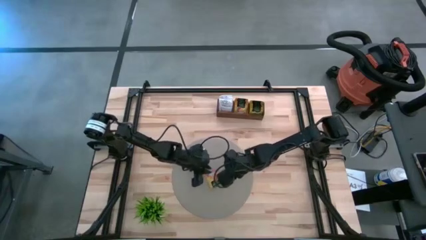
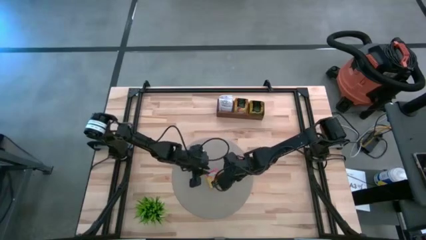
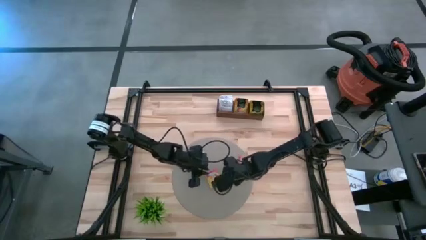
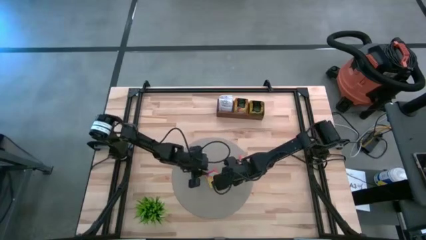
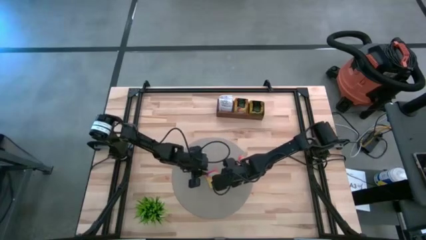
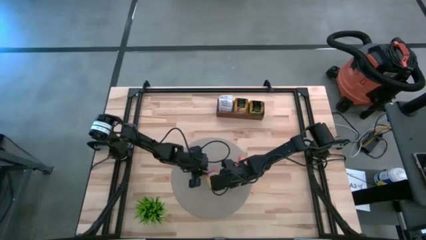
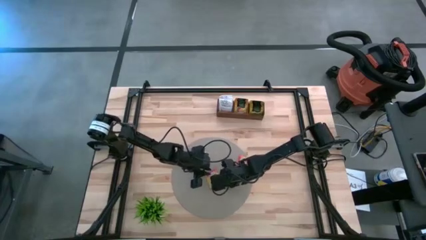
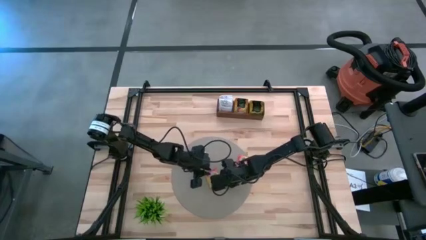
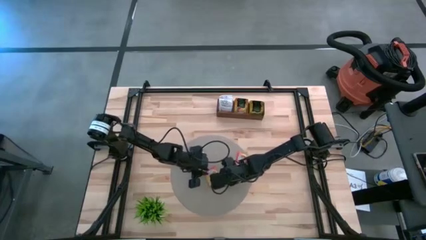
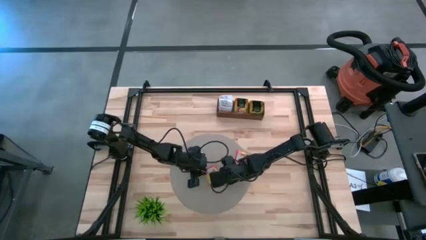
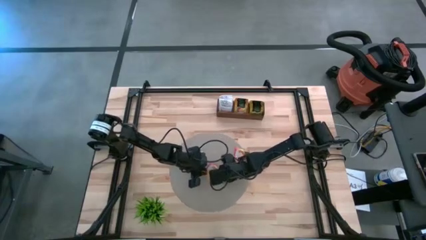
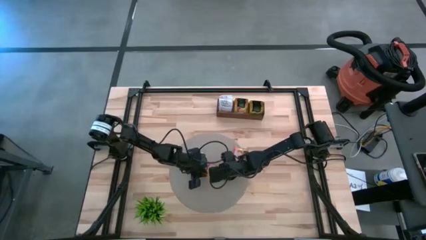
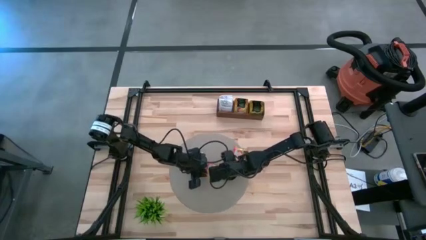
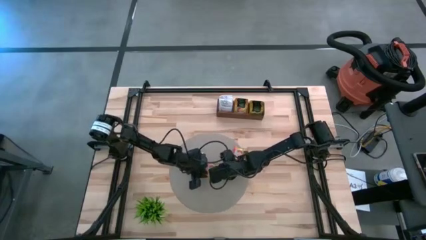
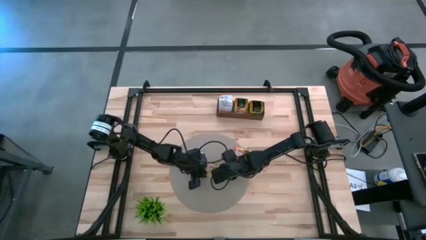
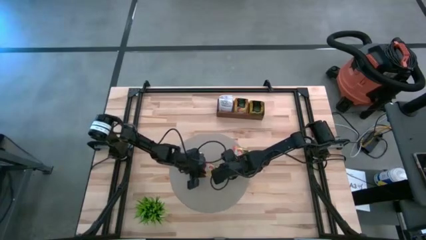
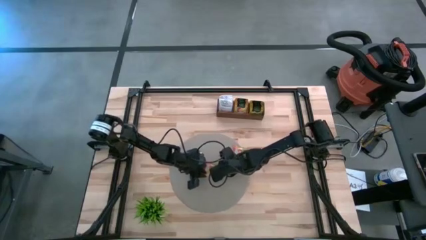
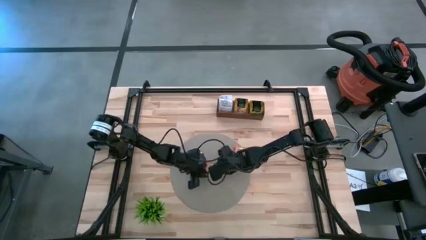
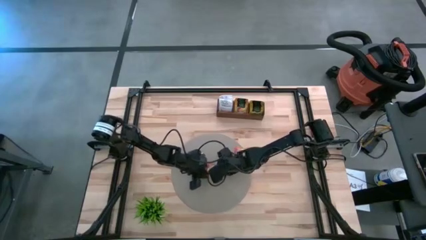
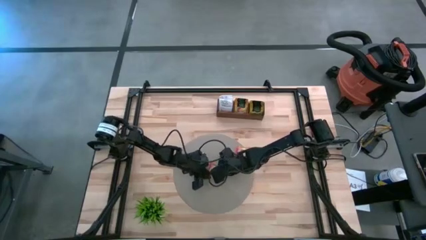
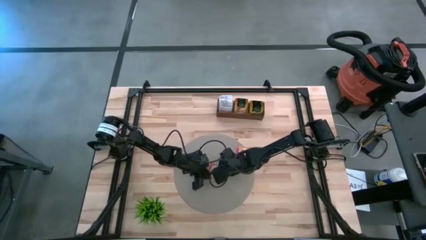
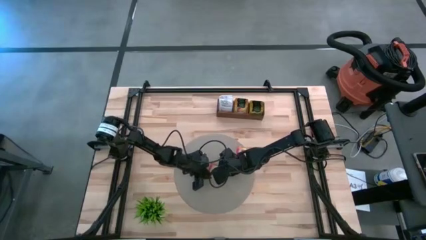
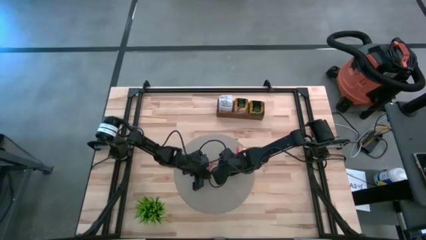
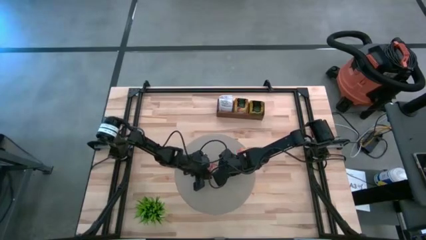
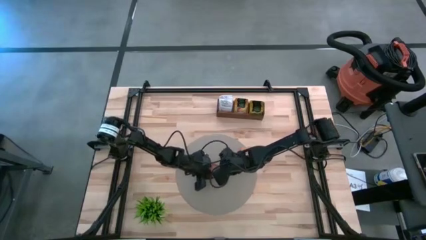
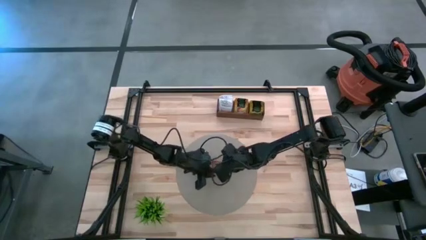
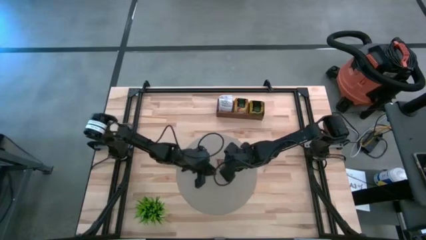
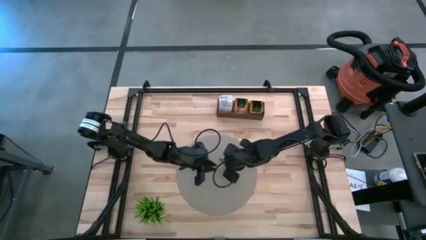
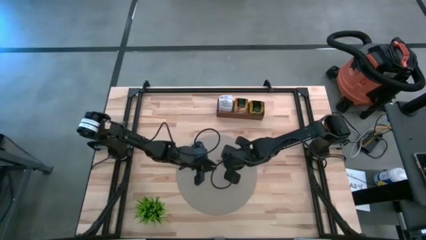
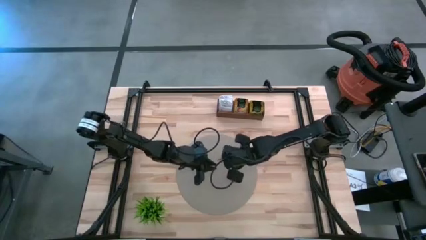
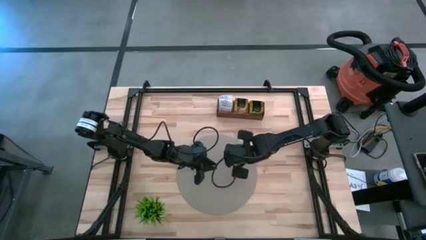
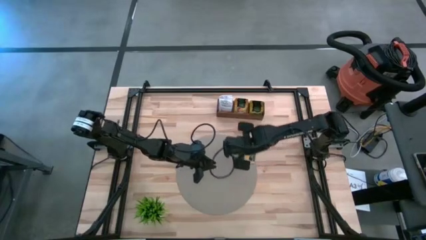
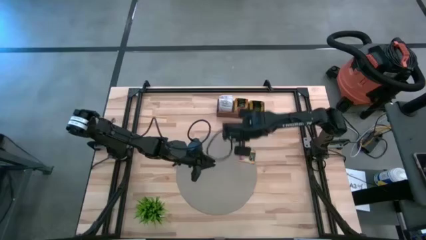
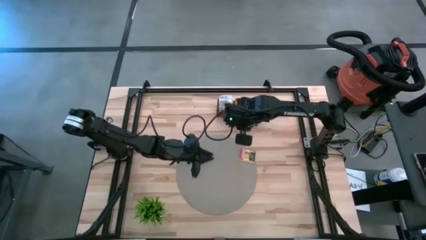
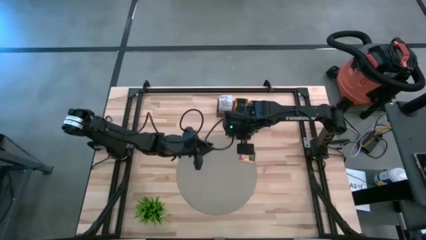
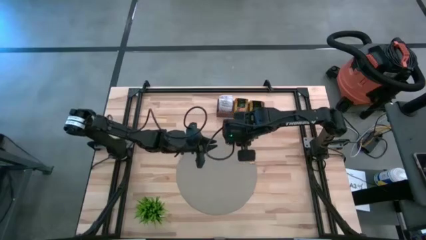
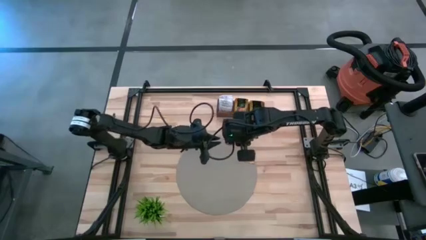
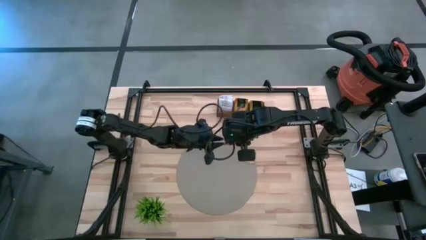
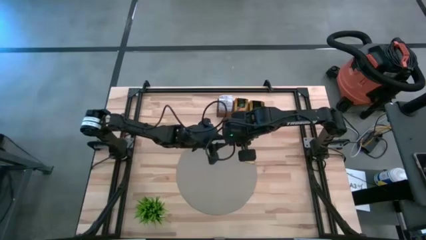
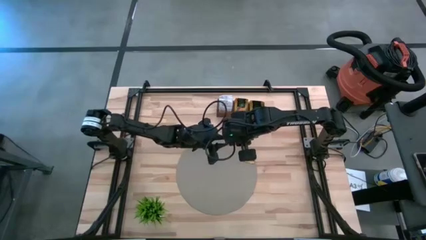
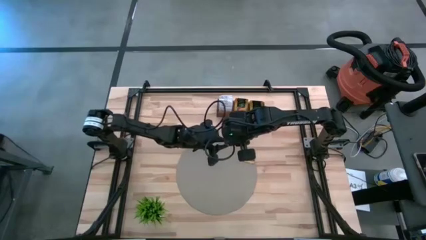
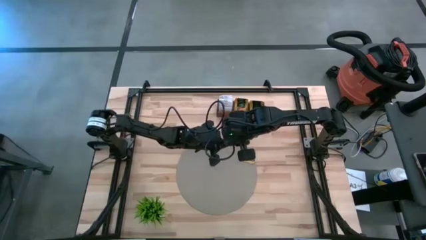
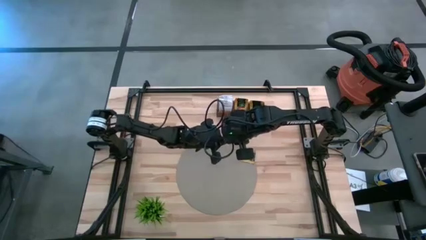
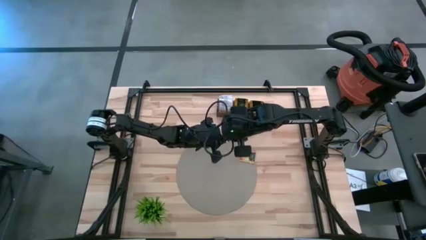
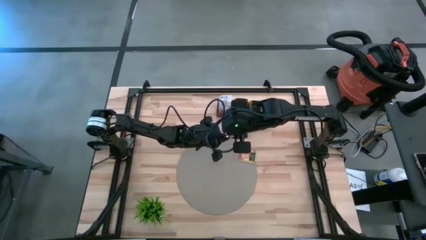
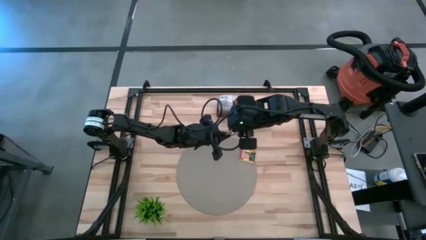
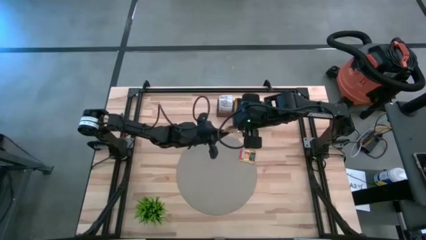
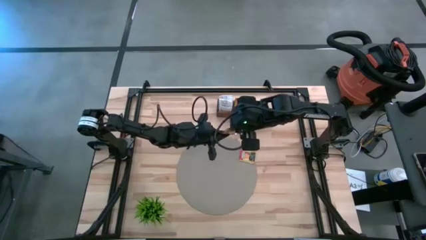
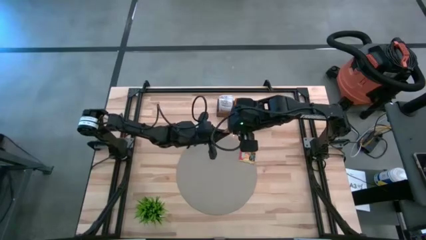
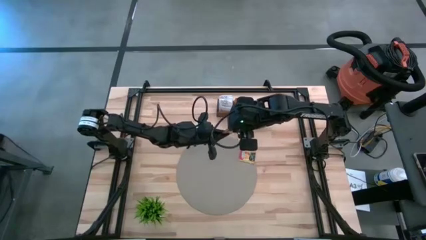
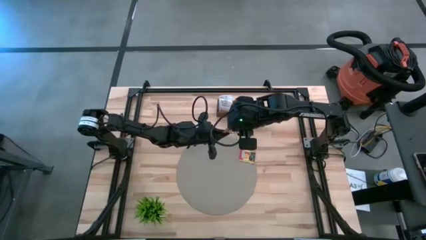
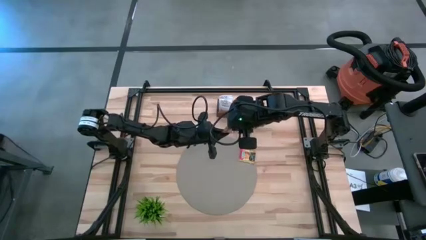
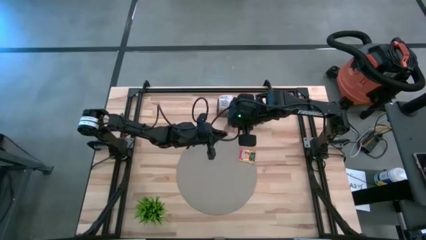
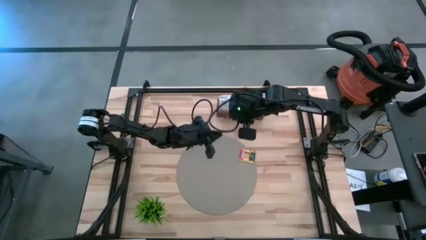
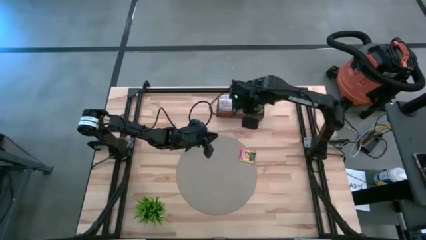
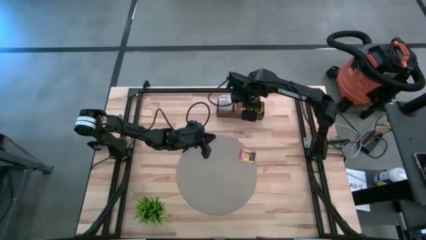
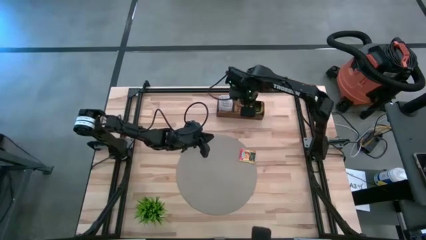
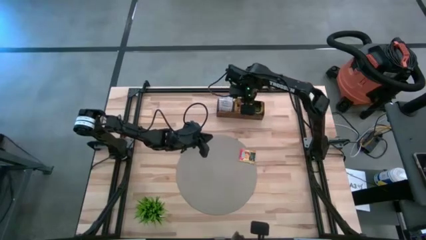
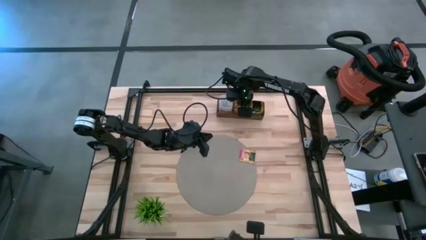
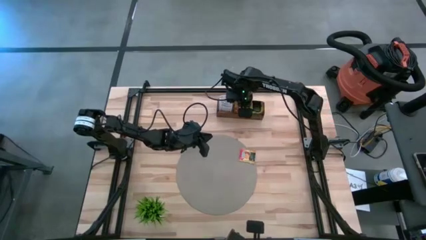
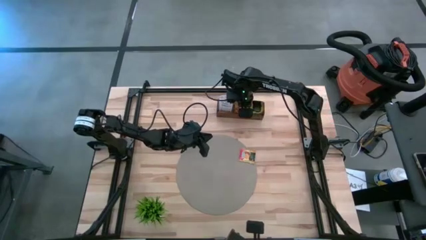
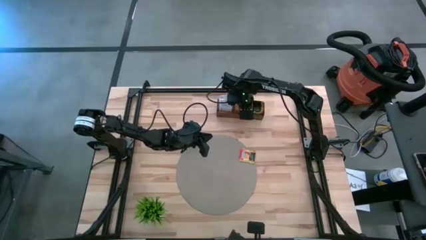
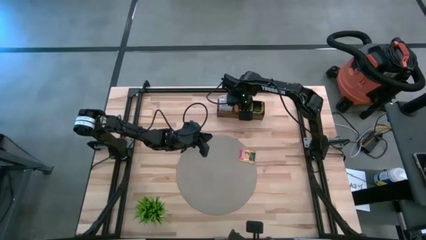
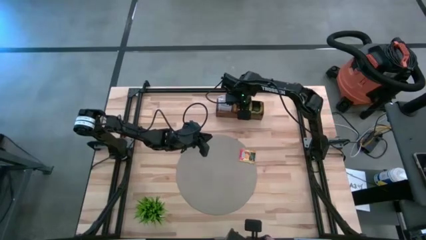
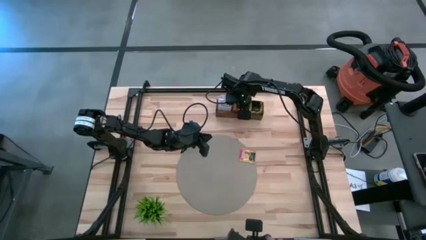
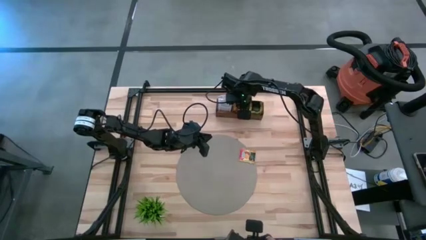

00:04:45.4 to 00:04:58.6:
Task: Pick & Place Tea
Put the orange tea bag into the middle section of the wooden organizer
